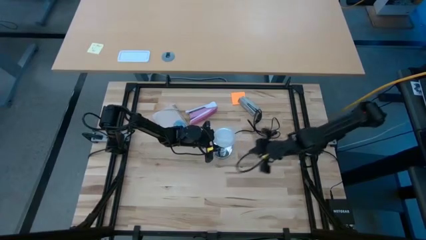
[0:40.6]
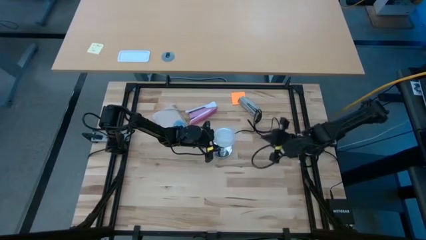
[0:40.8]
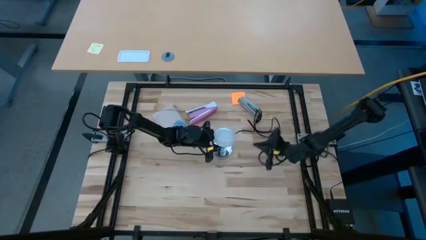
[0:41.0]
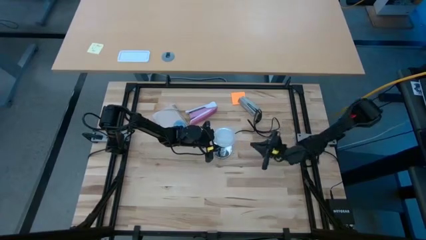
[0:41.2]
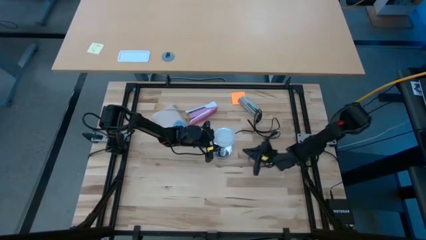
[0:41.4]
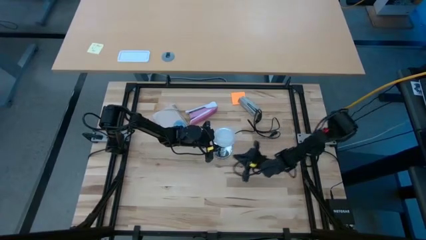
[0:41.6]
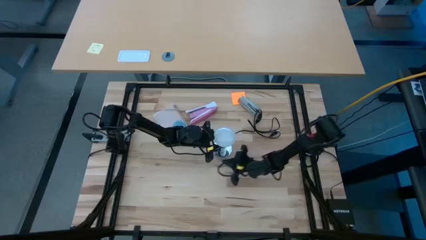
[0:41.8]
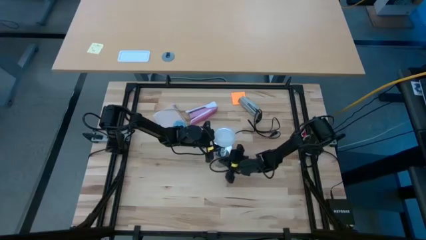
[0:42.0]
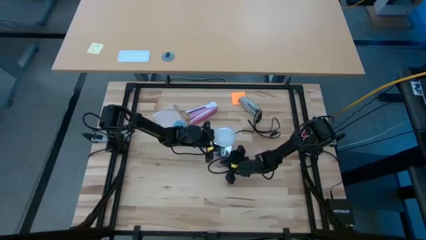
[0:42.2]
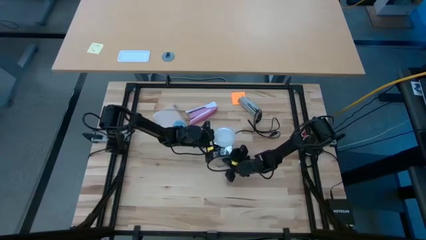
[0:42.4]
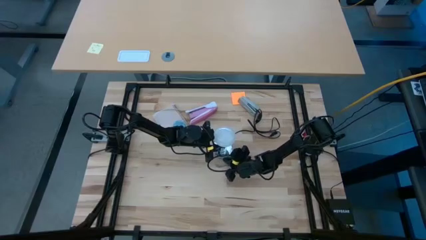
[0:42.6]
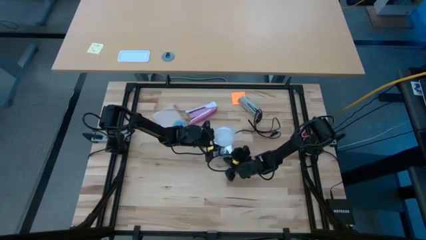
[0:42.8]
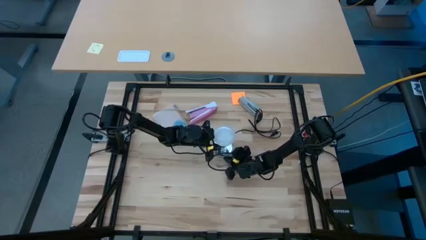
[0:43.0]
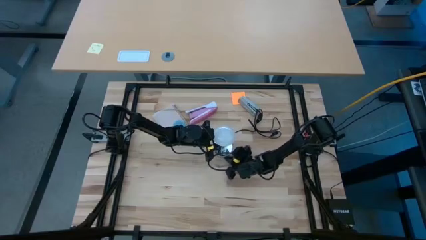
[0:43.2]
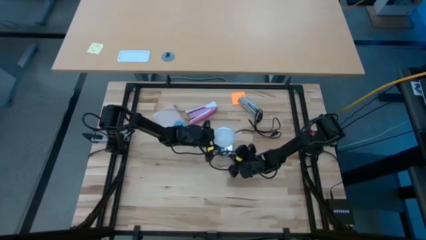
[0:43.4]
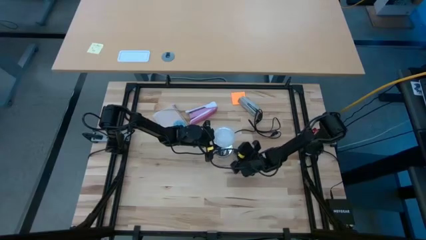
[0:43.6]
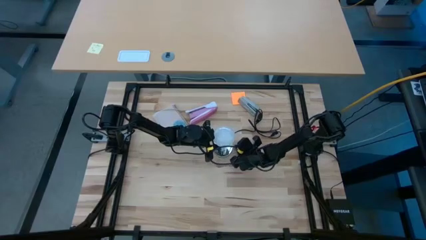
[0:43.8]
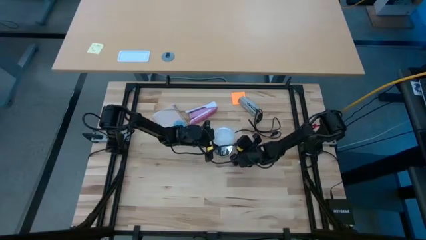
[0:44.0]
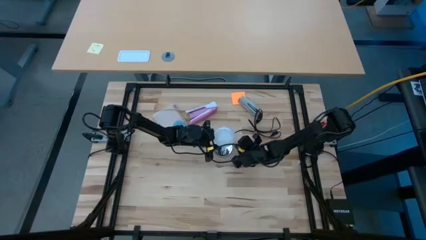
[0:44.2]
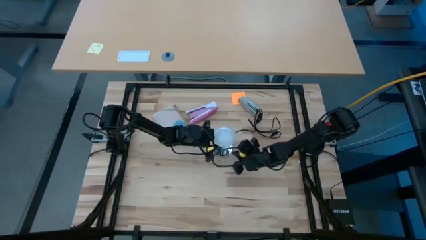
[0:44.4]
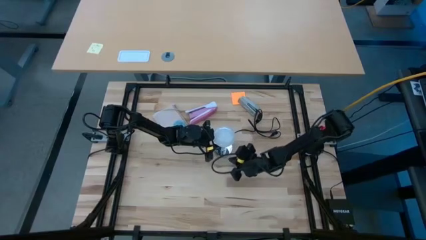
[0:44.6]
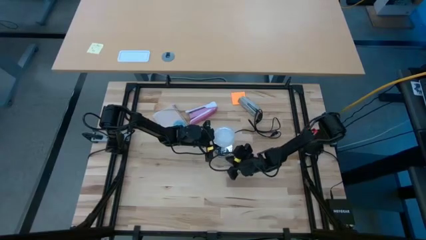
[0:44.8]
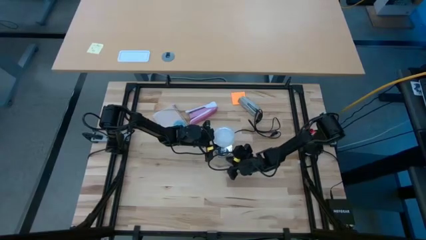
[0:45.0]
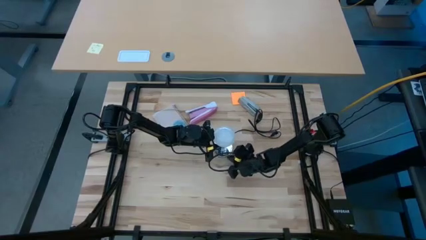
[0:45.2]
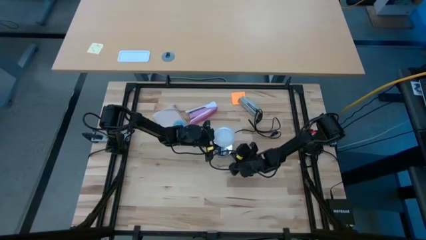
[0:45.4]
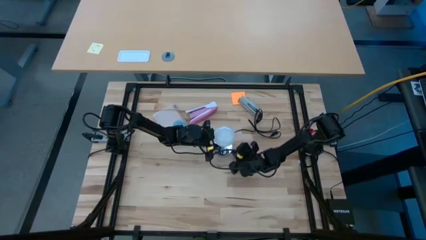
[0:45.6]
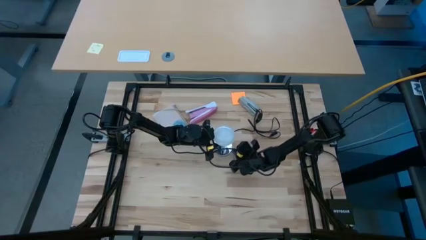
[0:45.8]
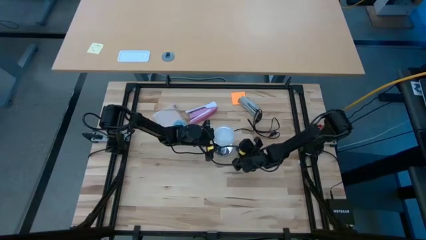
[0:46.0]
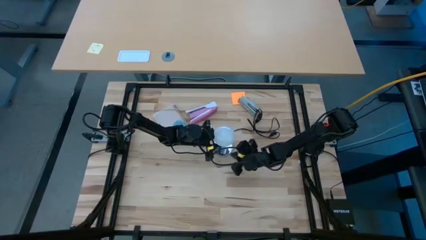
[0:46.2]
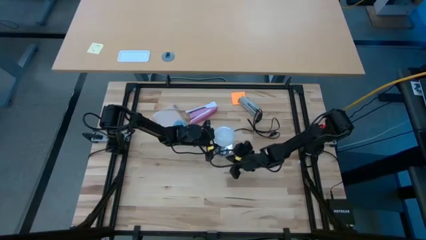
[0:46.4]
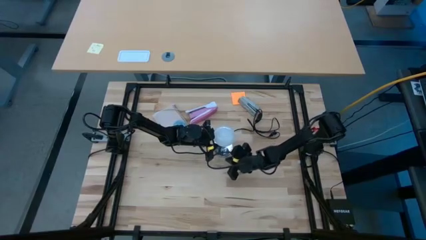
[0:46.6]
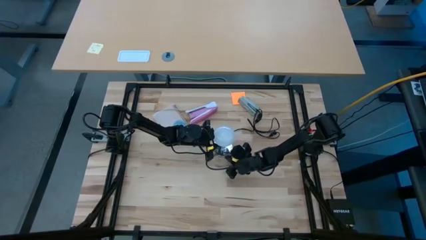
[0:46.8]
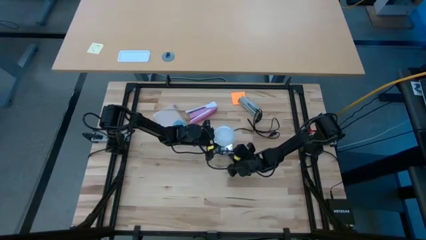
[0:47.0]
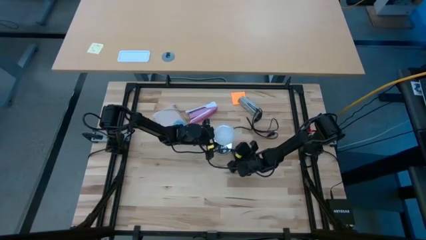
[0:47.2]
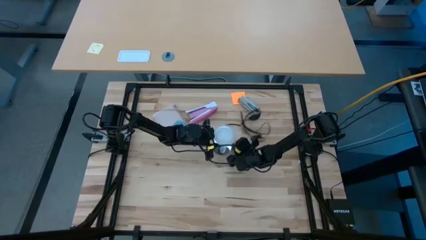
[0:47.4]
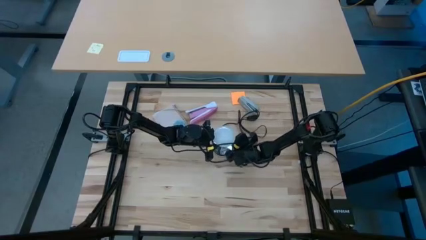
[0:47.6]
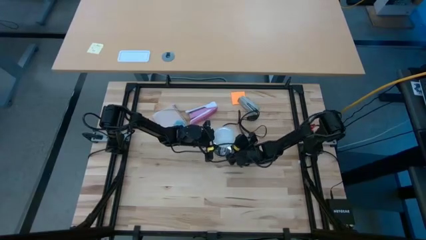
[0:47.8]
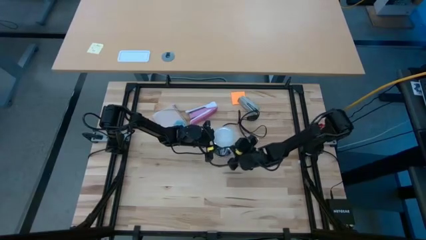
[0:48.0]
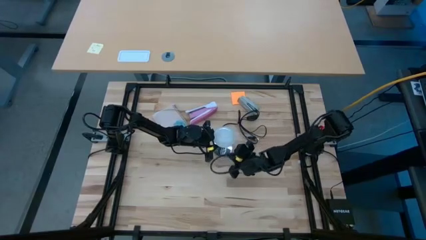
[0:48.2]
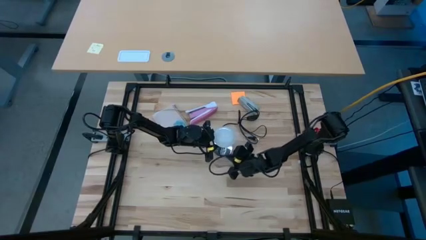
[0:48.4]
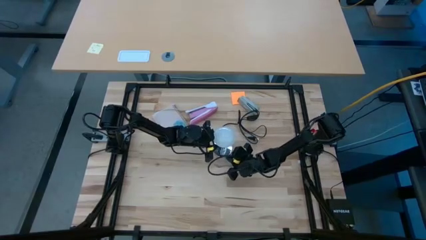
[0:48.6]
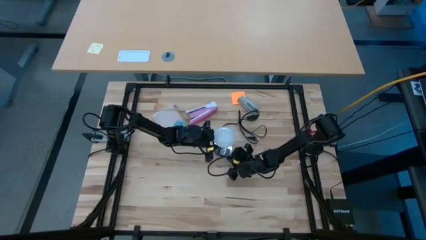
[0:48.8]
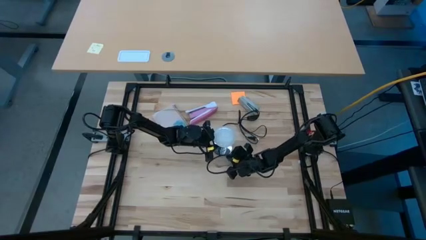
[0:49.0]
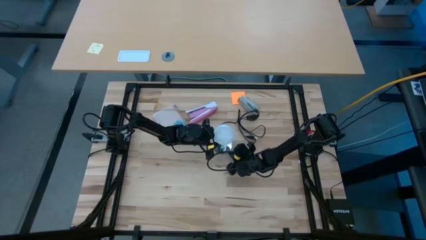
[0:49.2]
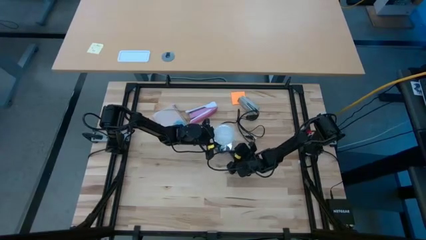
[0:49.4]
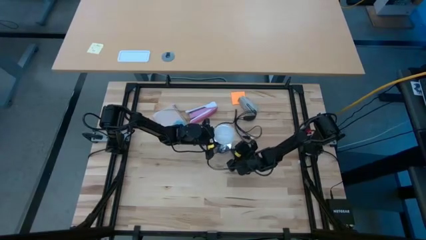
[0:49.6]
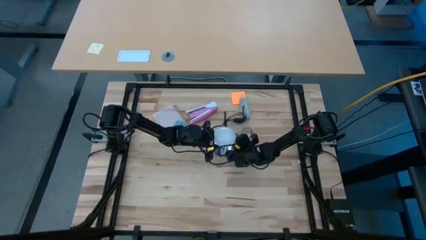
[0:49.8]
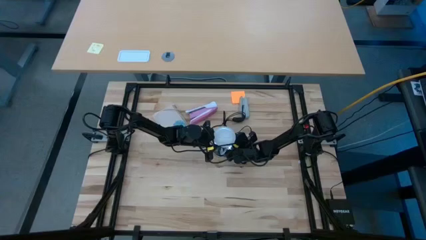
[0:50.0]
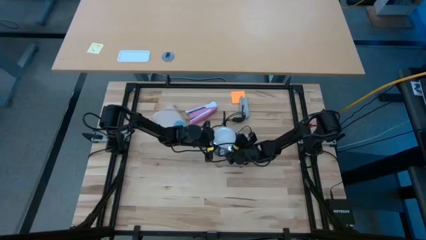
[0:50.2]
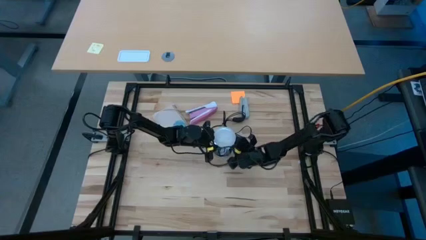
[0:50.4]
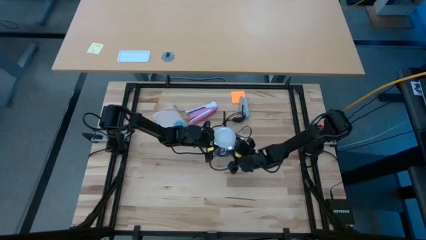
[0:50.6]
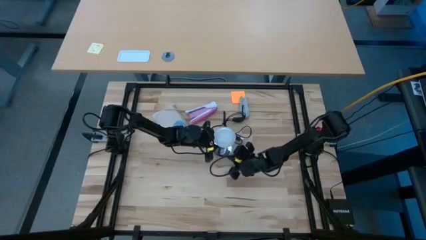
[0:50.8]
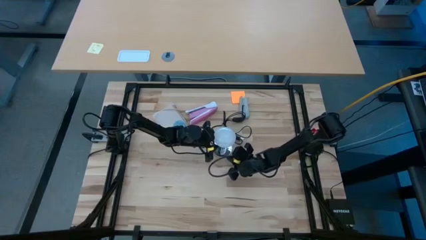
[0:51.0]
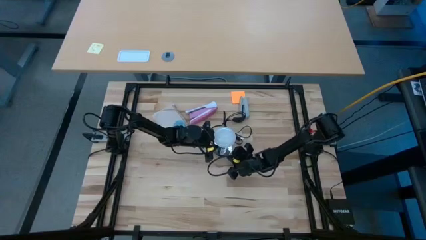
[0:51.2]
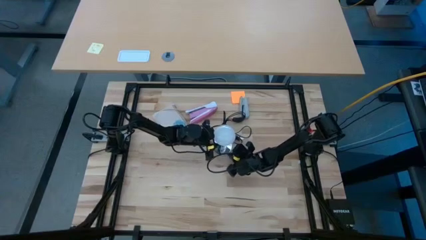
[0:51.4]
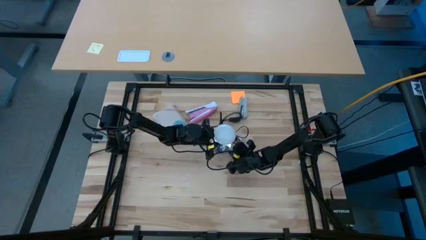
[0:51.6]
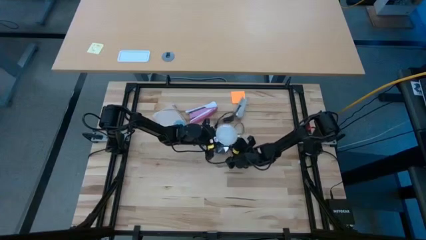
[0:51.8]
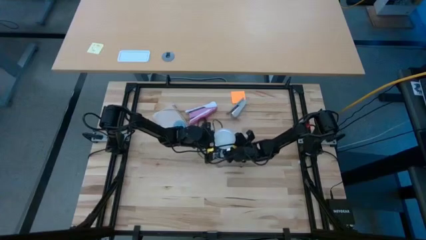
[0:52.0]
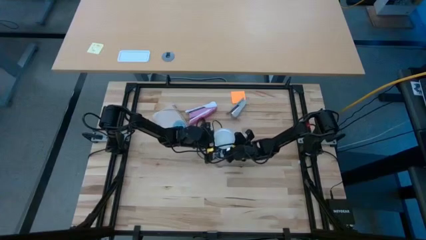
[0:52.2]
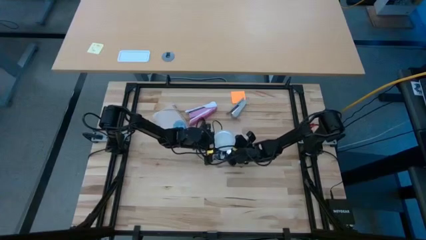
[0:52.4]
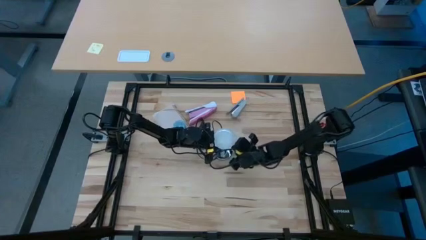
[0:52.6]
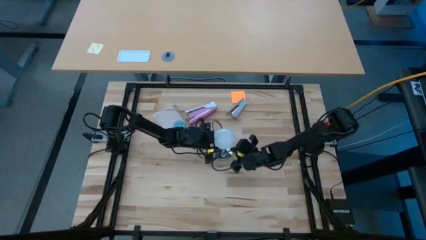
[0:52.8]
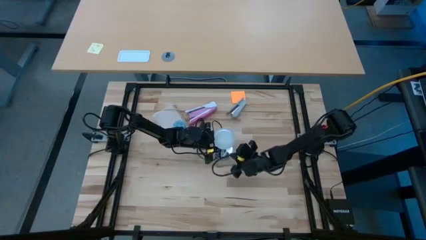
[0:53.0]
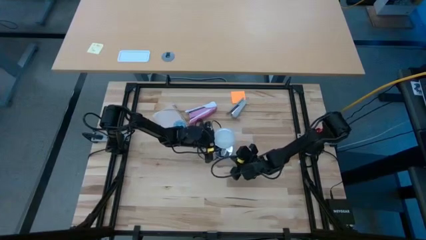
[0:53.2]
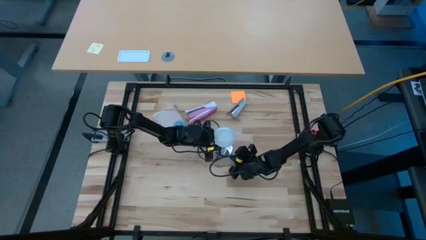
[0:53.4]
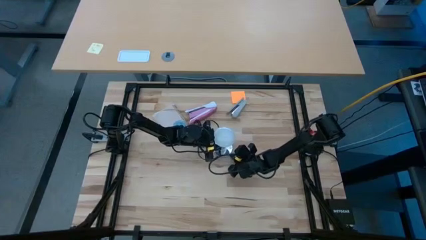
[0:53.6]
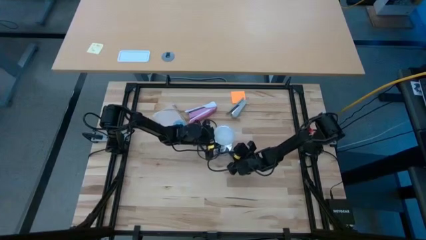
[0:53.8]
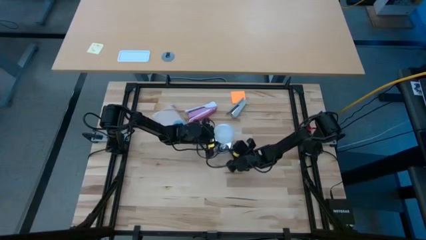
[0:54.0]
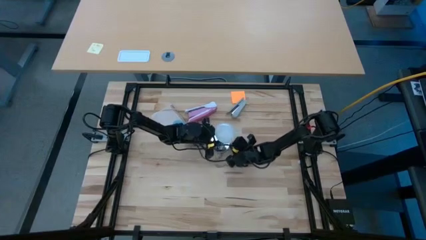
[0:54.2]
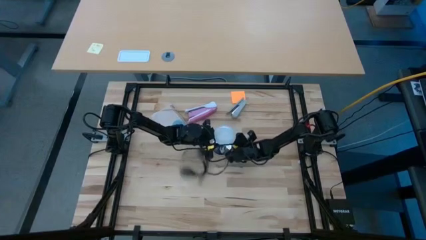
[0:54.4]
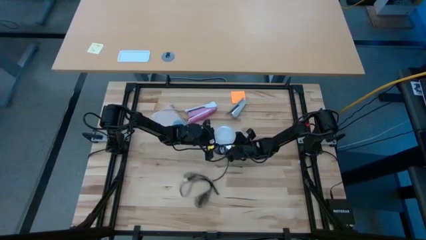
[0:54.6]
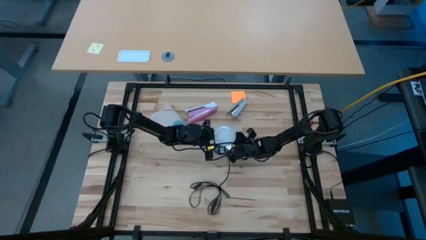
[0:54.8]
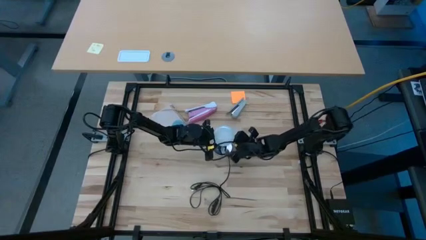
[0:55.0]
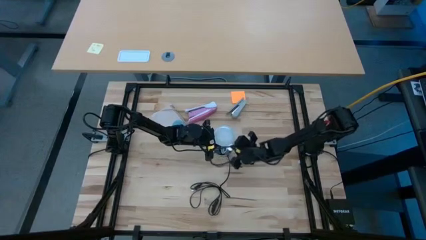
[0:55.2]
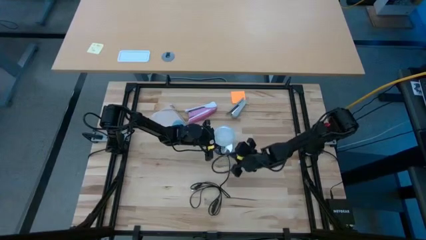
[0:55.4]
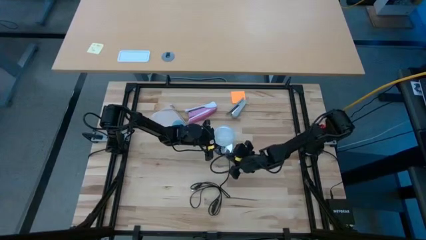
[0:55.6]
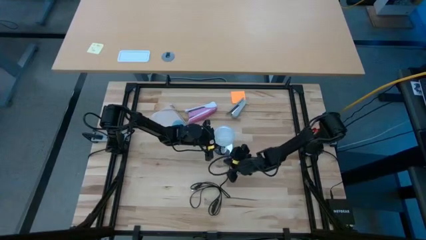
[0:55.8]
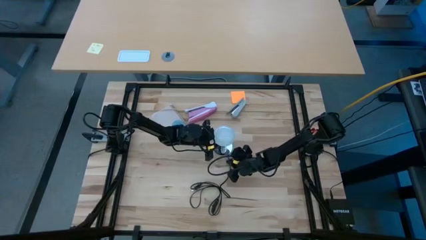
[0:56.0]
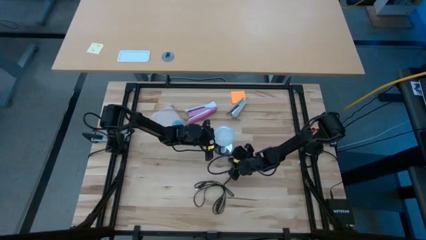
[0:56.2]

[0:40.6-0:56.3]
Task: Screw lightbulb
Insert the white lightbulb into the silver desk lamp
